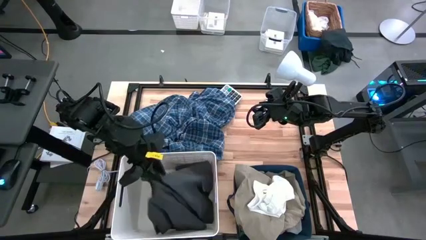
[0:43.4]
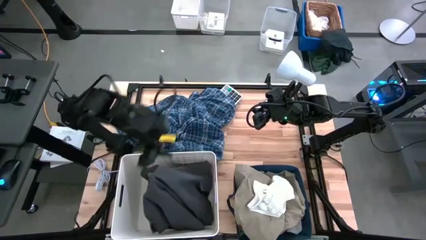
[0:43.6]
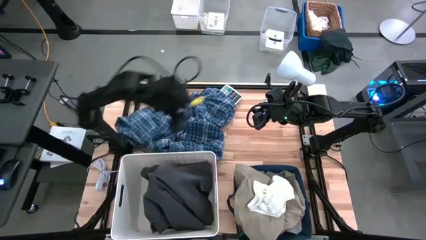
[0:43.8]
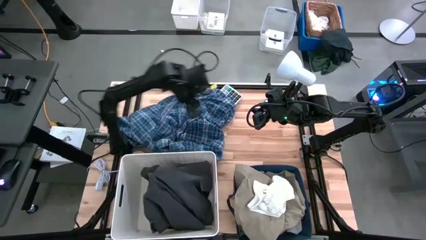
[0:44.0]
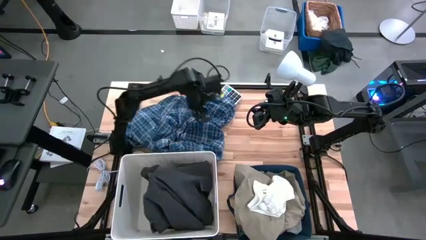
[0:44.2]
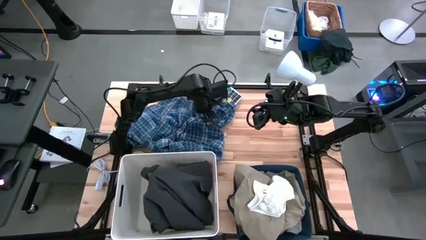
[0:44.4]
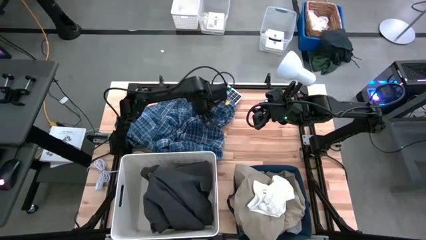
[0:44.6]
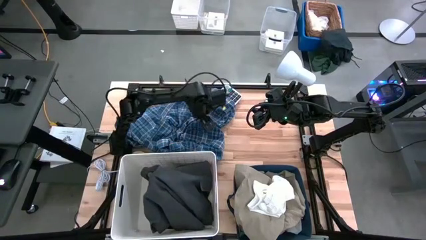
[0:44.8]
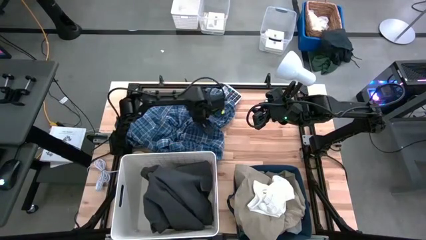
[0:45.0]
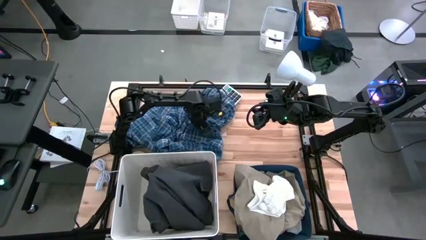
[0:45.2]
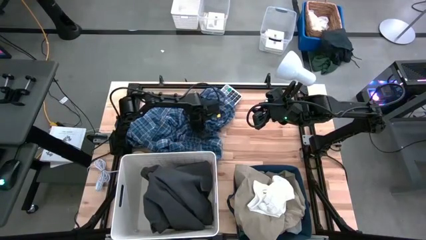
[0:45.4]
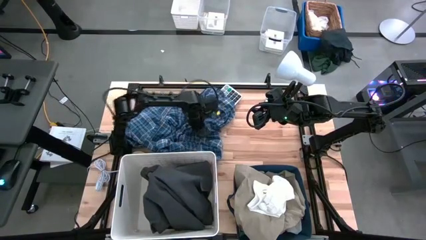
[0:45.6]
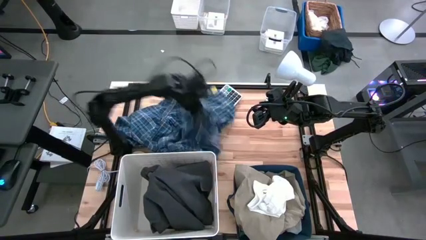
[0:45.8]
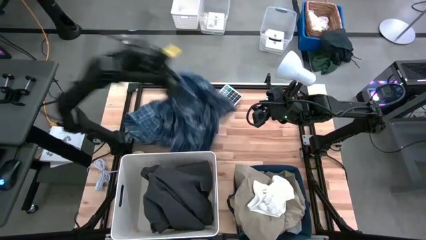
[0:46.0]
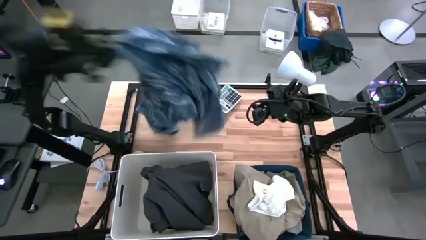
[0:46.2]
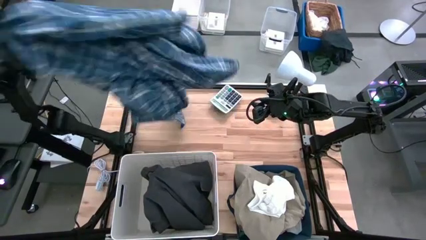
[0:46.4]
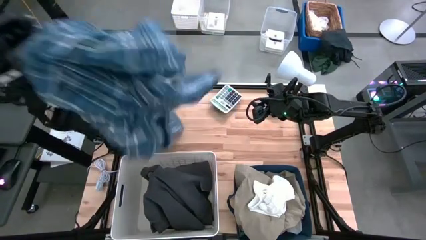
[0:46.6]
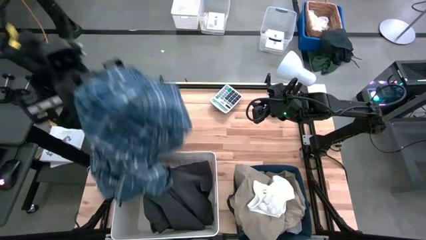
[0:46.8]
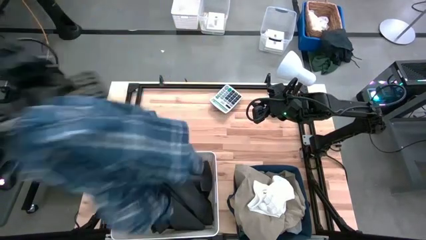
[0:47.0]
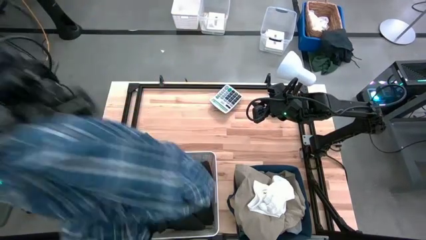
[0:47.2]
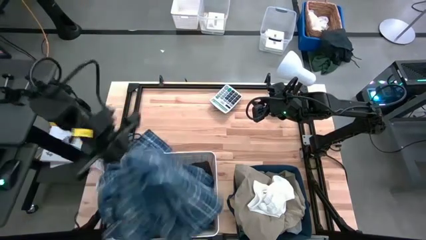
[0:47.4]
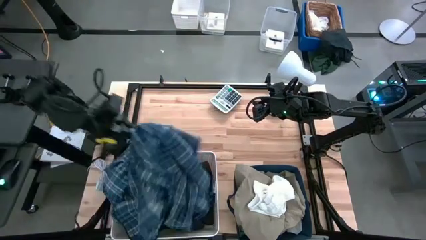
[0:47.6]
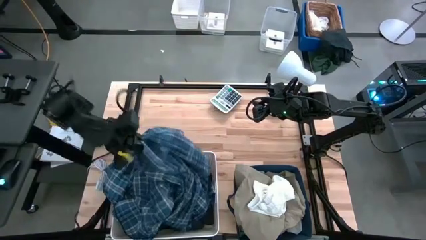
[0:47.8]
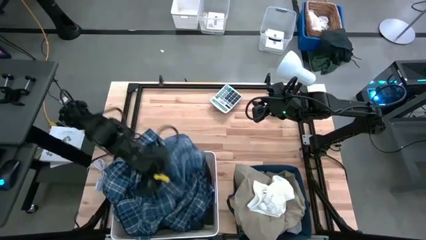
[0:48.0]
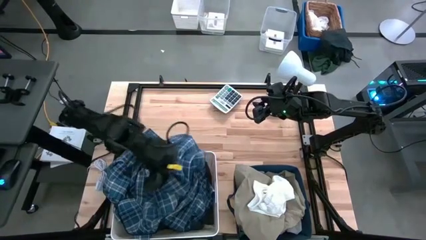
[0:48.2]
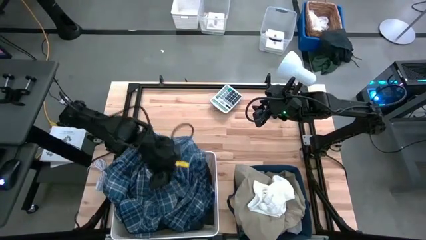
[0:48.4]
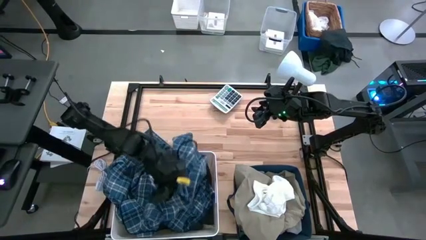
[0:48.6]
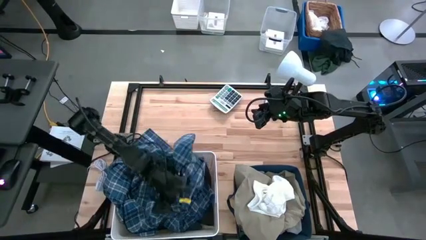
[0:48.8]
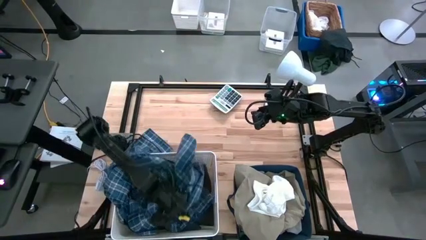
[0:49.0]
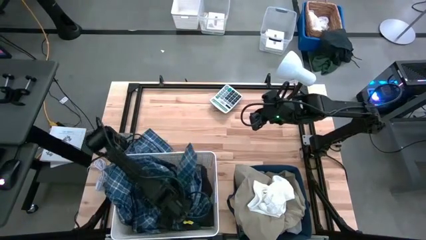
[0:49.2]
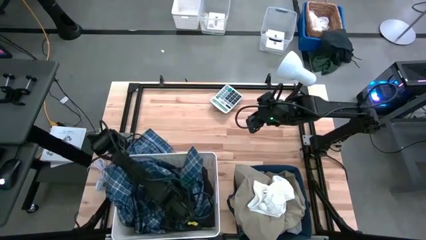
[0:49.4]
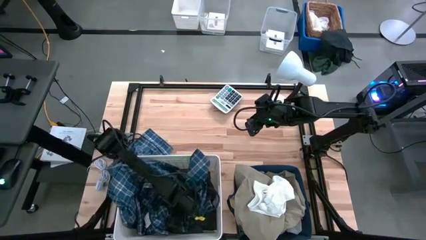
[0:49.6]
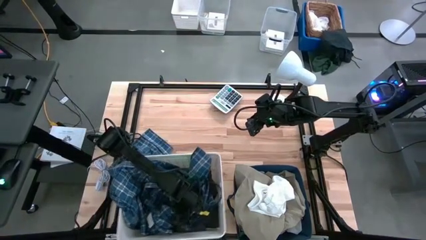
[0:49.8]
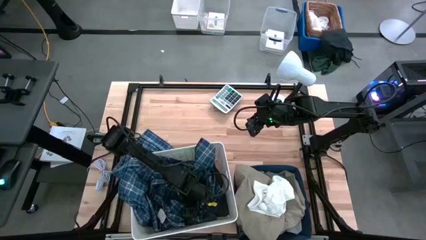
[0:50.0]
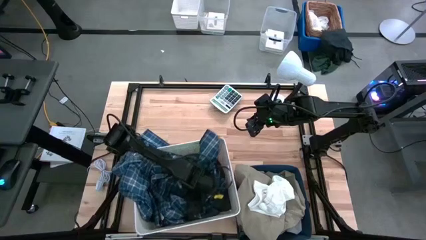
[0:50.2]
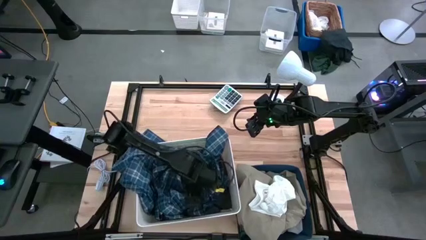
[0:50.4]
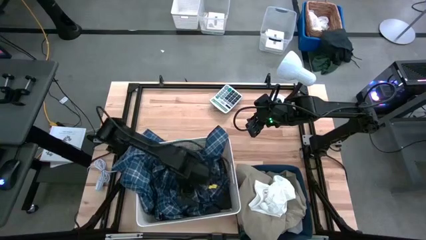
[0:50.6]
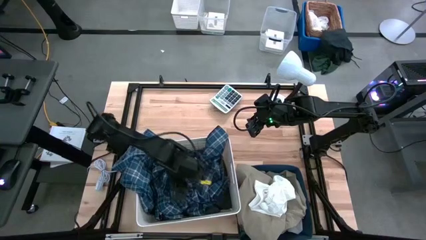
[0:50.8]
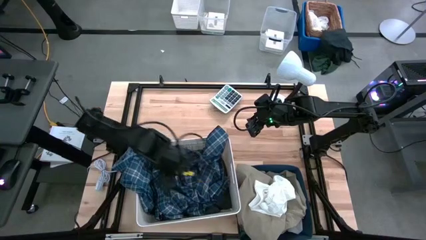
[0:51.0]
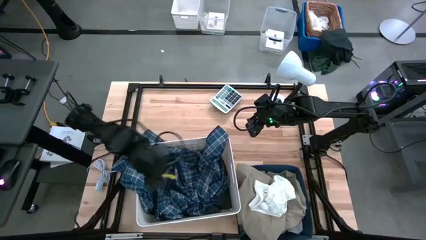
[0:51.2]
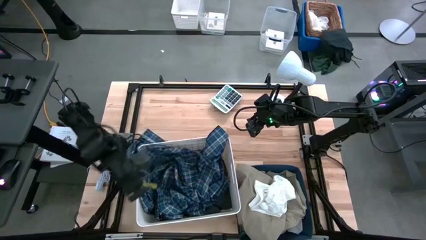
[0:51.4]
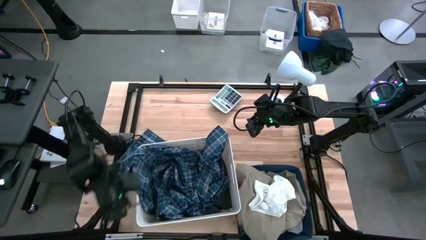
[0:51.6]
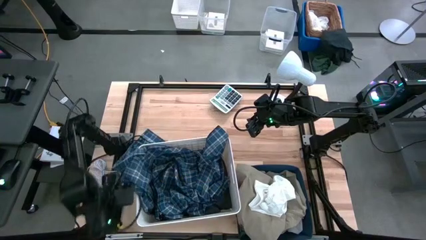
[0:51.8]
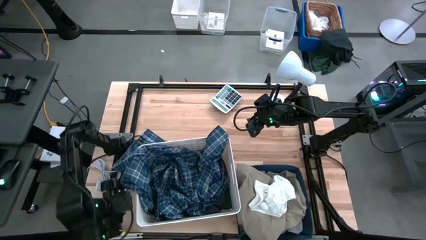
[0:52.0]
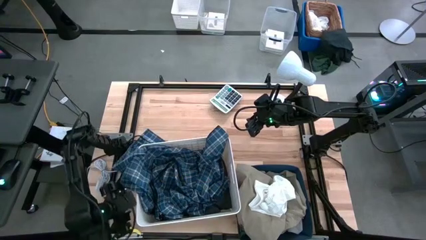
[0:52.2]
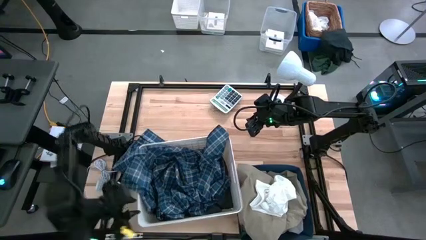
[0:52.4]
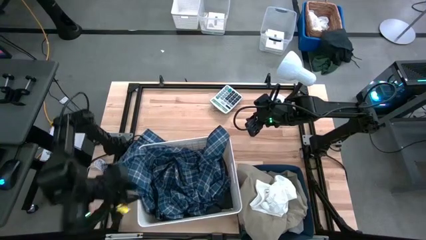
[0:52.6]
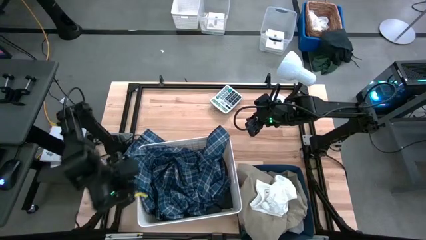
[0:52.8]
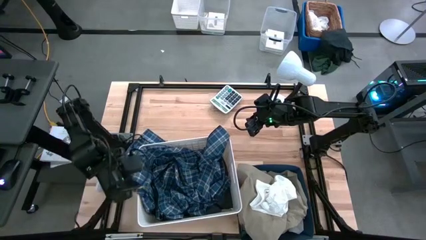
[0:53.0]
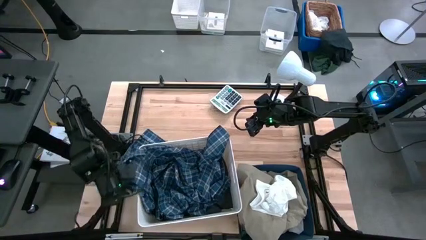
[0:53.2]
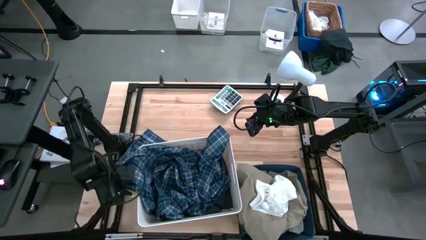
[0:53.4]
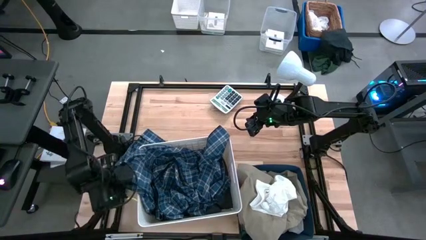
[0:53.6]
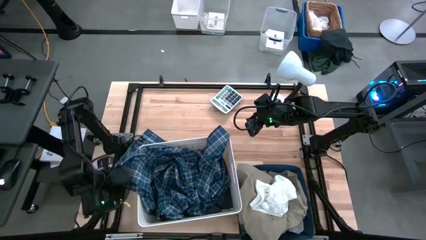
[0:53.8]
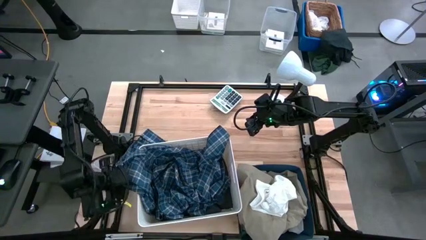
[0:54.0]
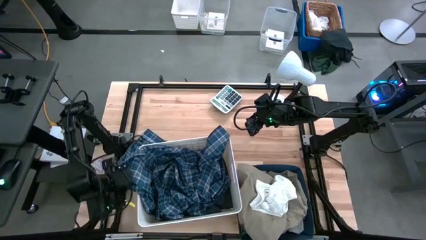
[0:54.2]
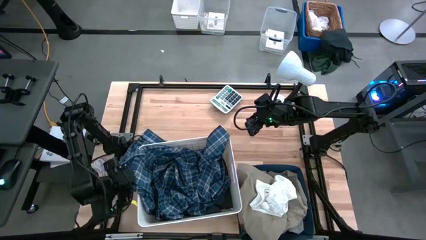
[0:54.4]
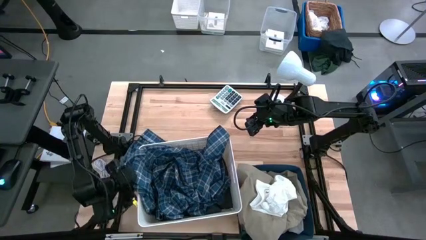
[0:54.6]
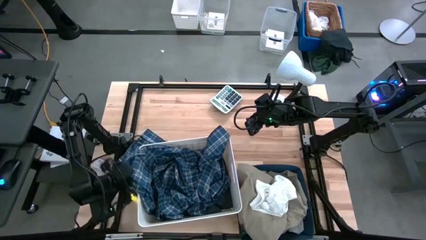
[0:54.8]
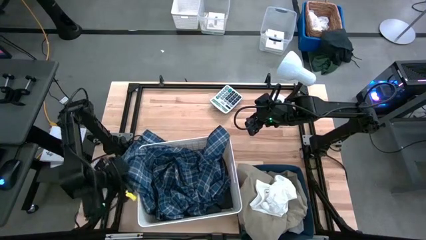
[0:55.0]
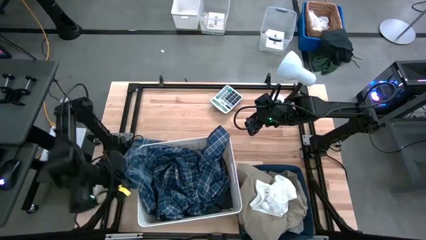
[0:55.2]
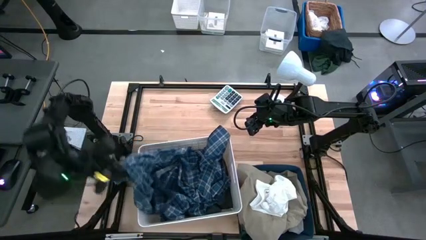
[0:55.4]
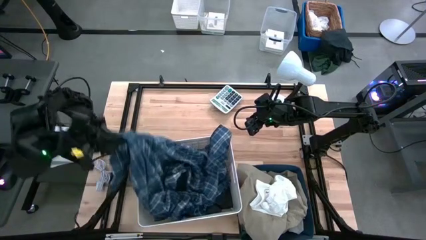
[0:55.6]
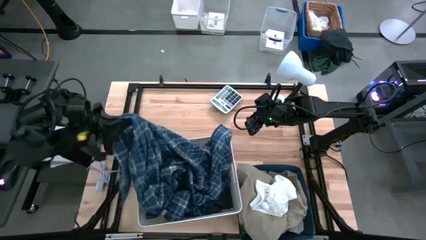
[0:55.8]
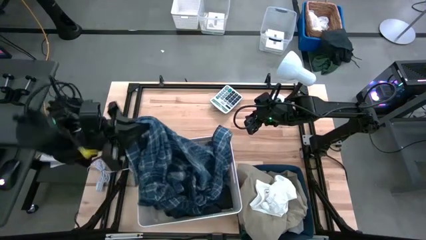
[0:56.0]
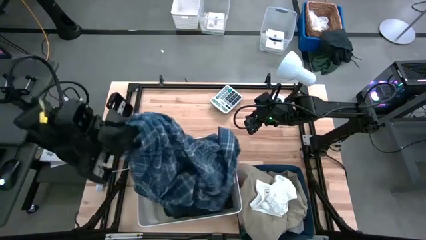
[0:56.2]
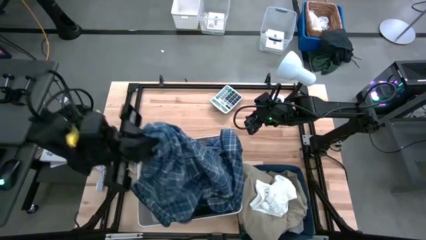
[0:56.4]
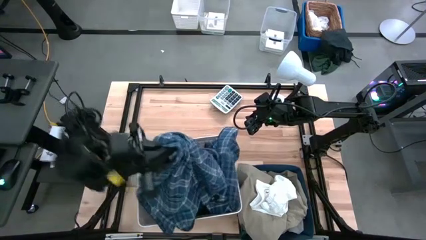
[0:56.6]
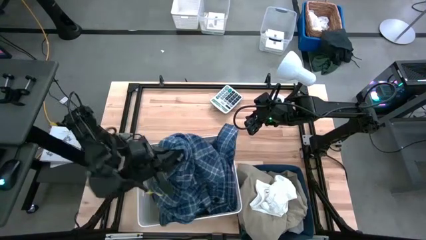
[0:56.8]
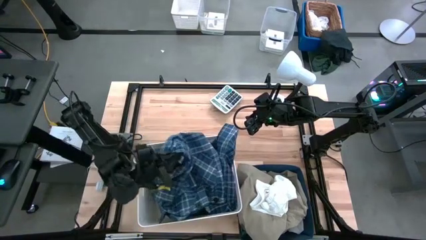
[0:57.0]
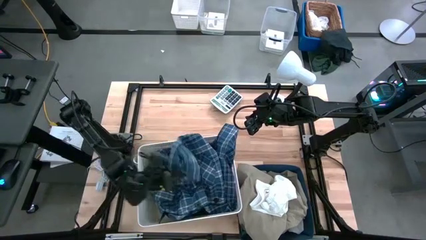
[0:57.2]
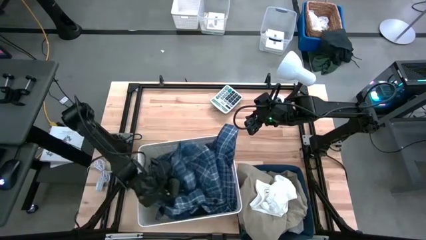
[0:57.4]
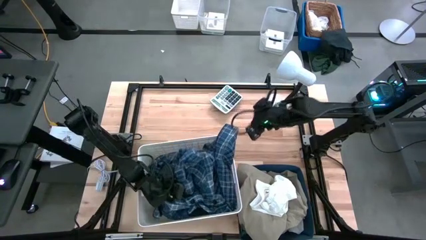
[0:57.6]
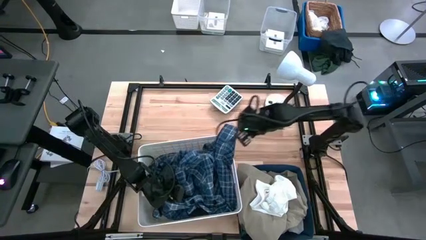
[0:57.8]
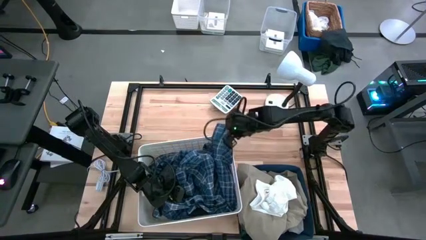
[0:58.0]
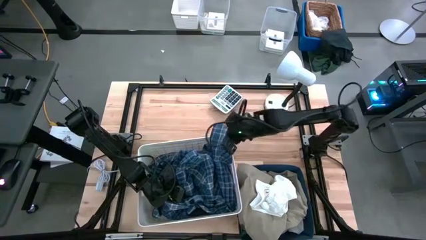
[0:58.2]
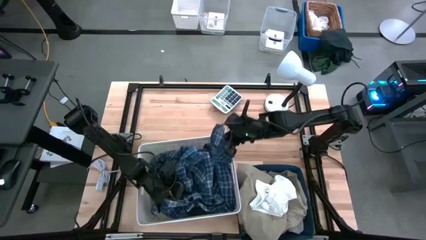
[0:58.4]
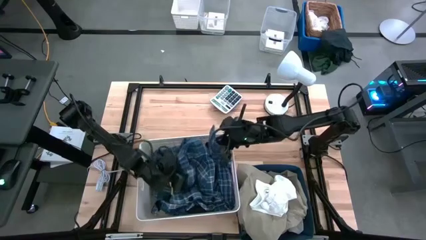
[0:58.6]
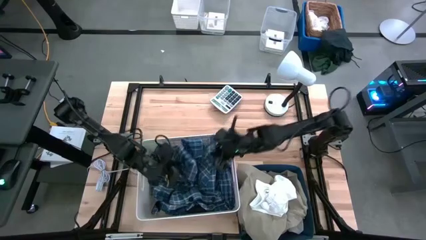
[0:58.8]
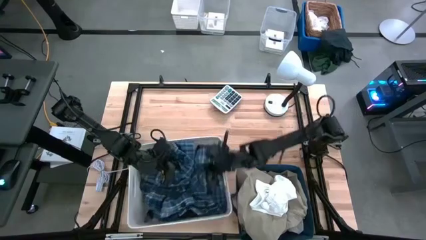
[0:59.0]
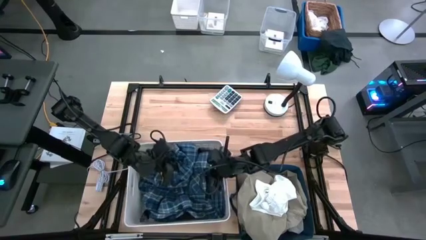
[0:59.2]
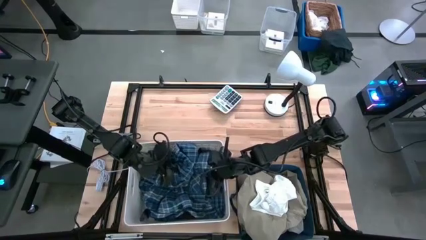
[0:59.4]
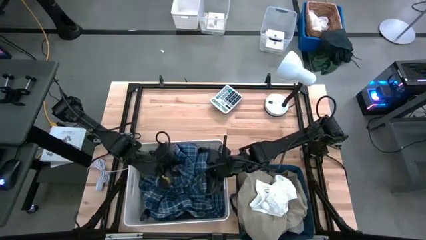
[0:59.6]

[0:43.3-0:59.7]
Task: Sort clothes
Put the blue patterned shirt into the white bin

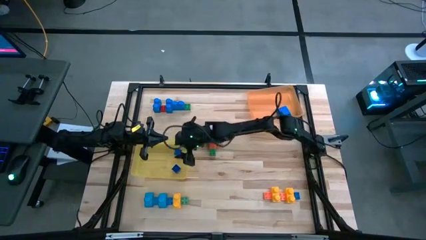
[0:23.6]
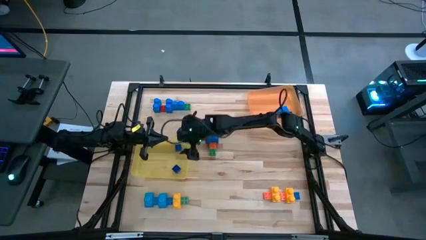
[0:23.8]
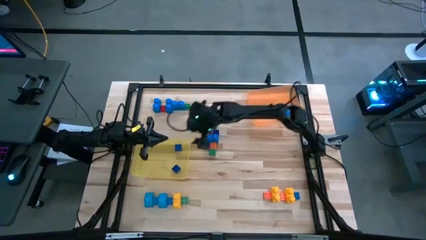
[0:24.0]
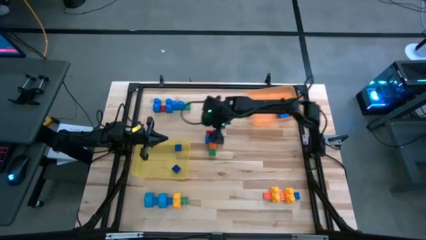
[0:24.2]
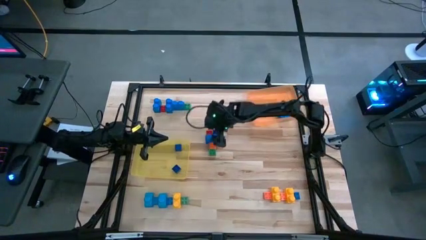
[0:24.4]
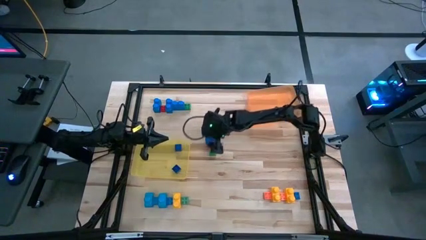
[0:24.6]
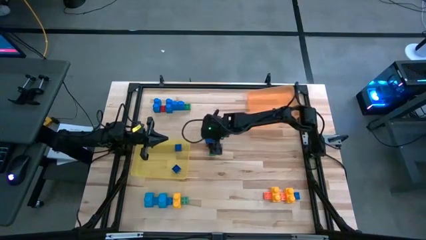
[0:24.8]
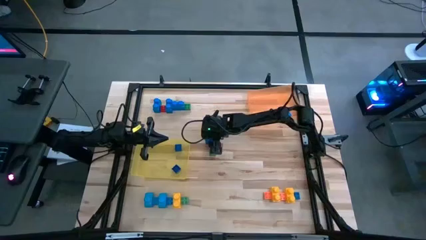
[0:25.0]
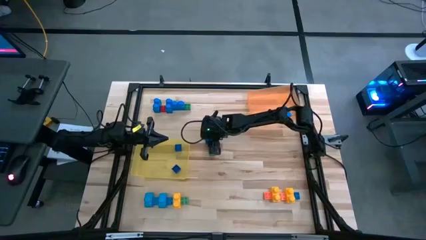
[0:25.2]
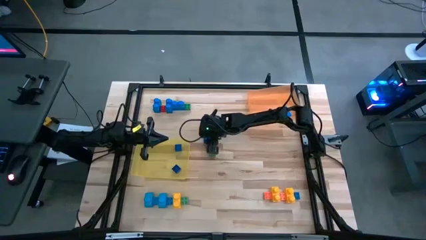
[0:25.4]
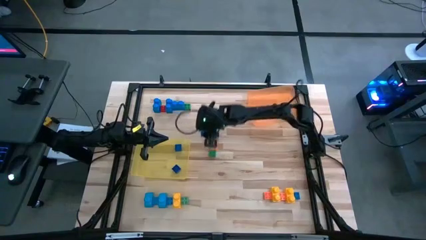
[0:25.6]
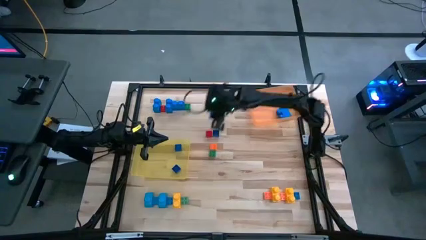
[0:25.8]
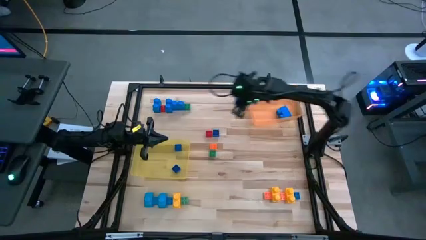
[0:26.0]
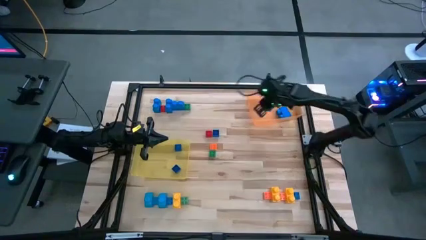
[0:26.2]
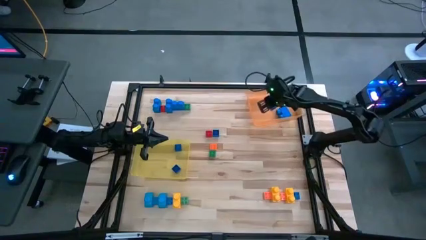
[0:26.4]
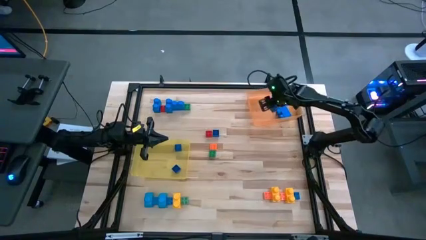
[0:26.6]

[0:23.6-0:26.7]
Task: Sort blocks by size
Put the large blue 2 stud game piece into the orange bin
